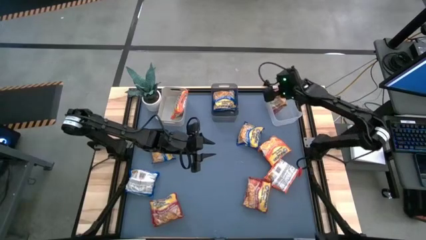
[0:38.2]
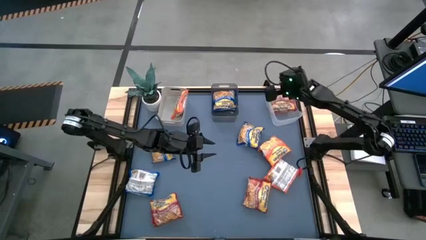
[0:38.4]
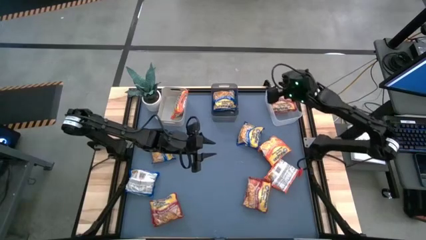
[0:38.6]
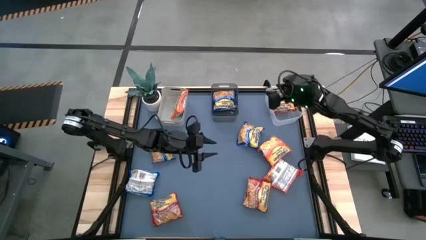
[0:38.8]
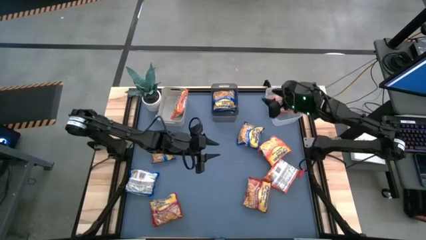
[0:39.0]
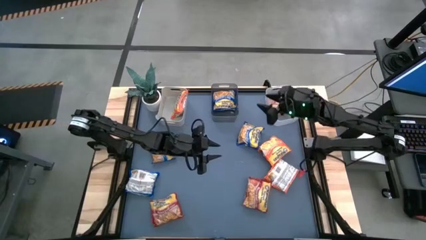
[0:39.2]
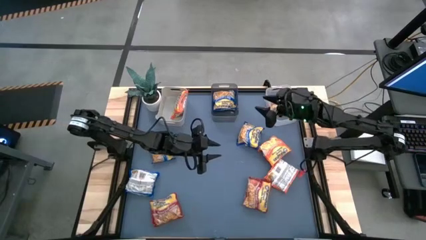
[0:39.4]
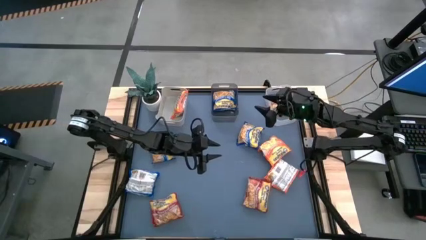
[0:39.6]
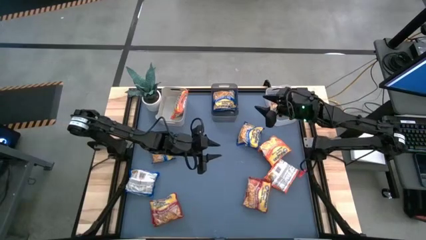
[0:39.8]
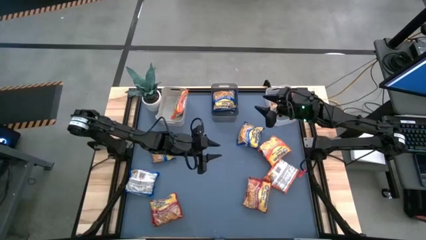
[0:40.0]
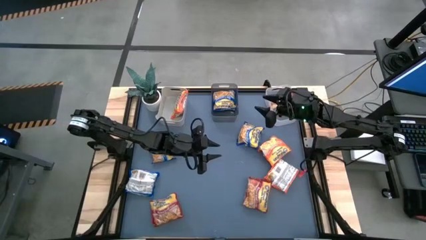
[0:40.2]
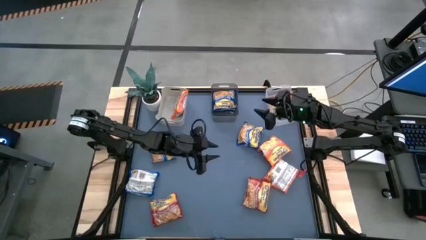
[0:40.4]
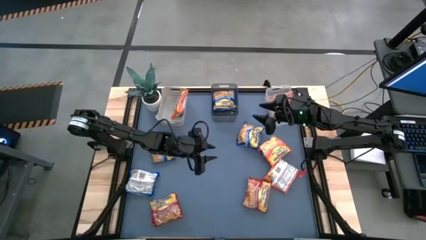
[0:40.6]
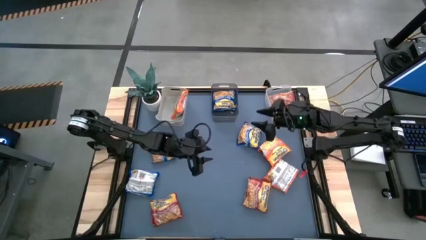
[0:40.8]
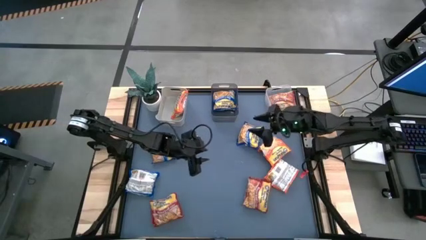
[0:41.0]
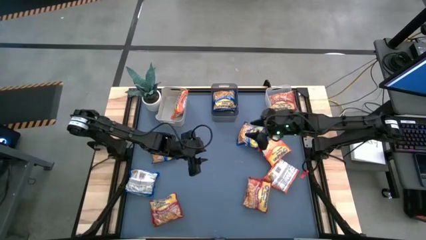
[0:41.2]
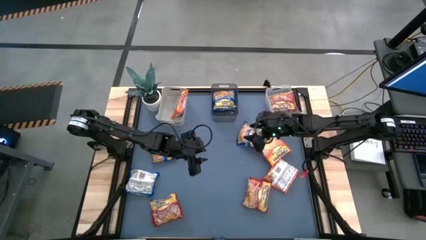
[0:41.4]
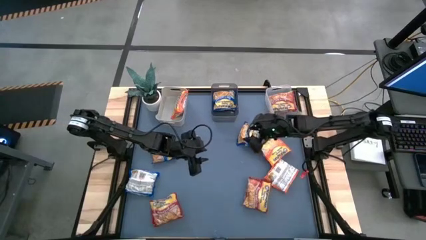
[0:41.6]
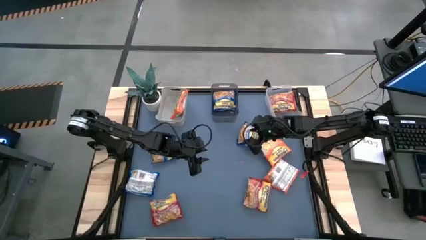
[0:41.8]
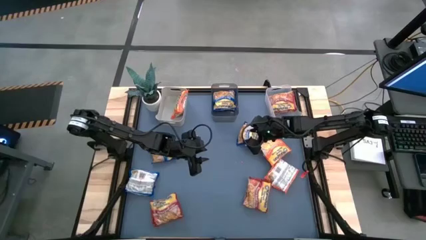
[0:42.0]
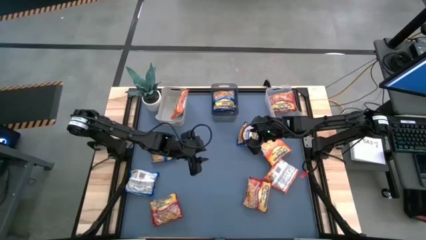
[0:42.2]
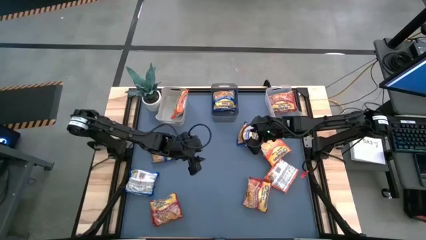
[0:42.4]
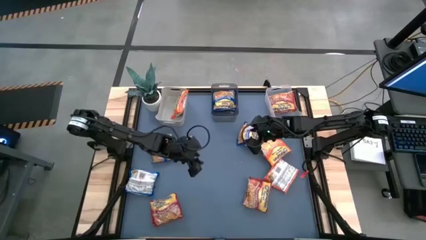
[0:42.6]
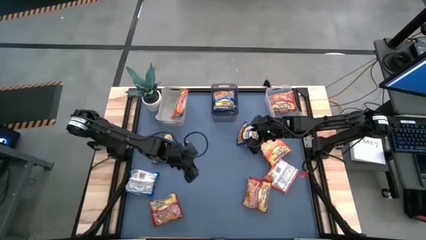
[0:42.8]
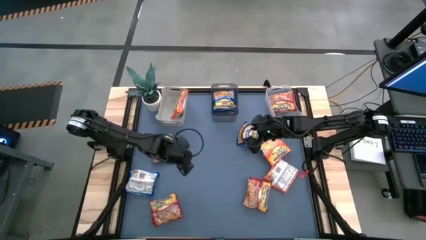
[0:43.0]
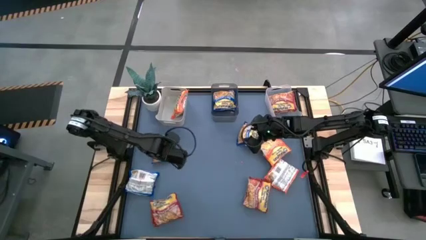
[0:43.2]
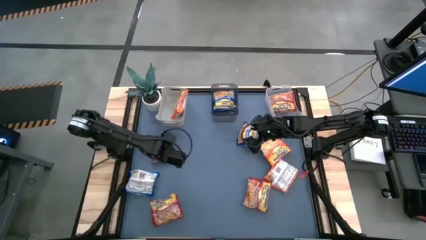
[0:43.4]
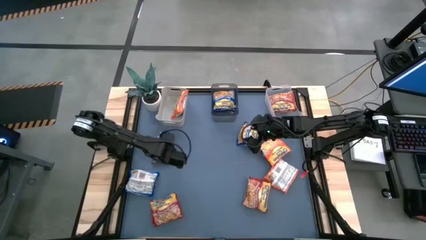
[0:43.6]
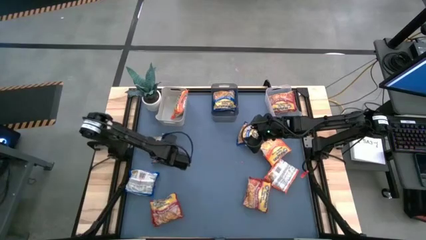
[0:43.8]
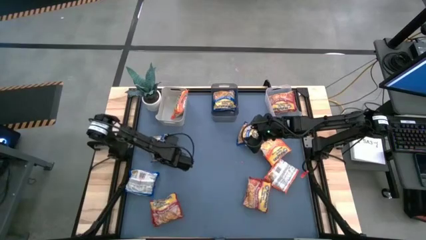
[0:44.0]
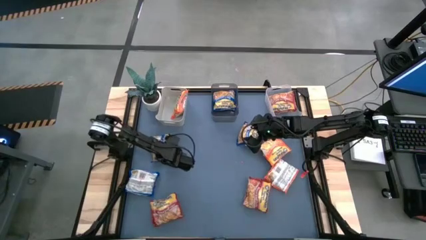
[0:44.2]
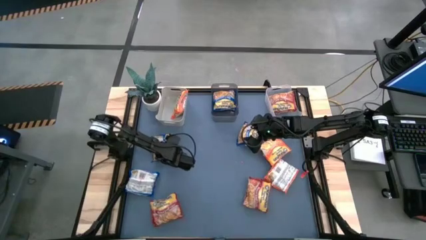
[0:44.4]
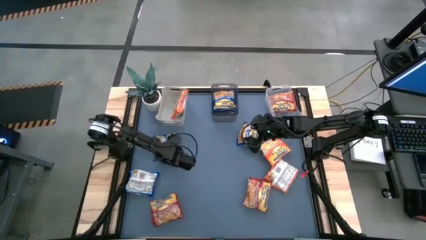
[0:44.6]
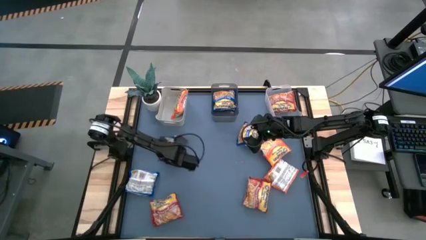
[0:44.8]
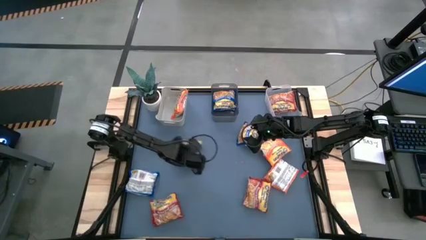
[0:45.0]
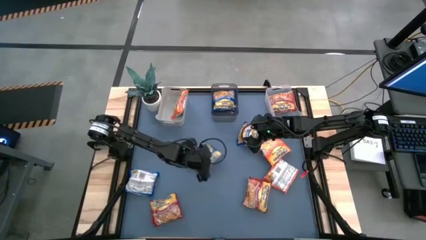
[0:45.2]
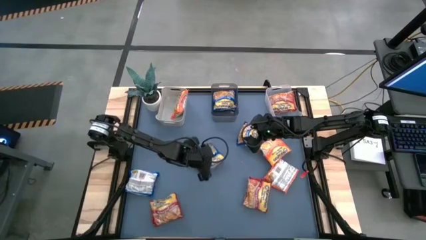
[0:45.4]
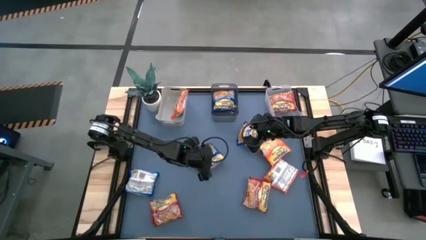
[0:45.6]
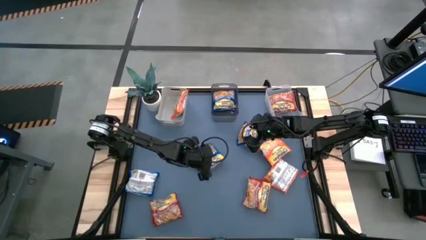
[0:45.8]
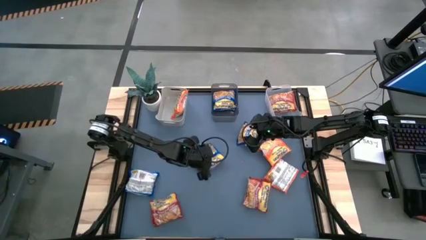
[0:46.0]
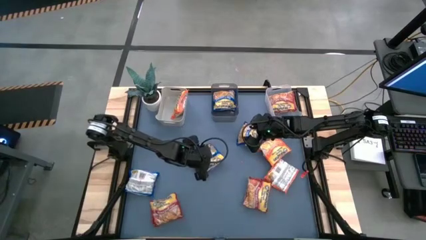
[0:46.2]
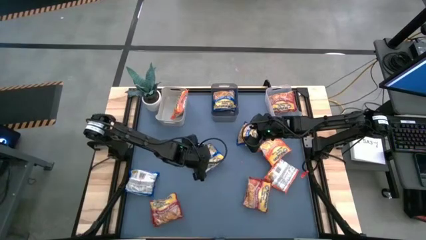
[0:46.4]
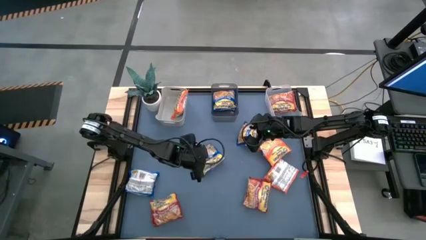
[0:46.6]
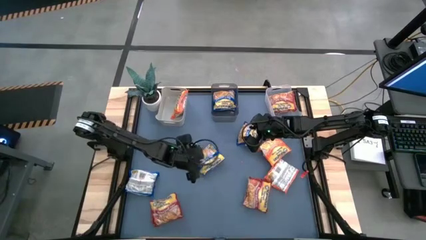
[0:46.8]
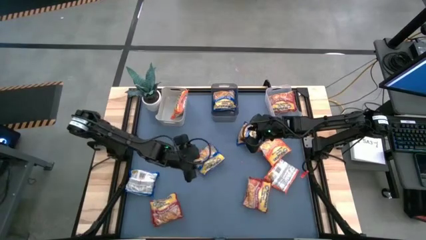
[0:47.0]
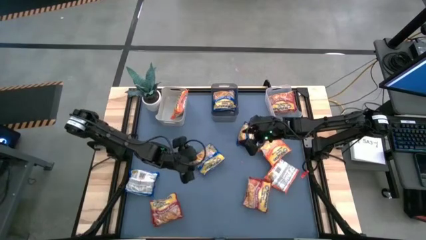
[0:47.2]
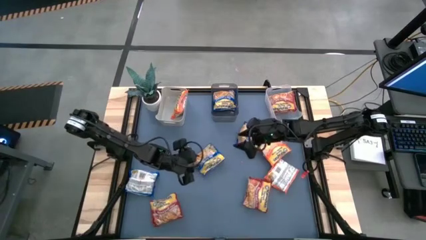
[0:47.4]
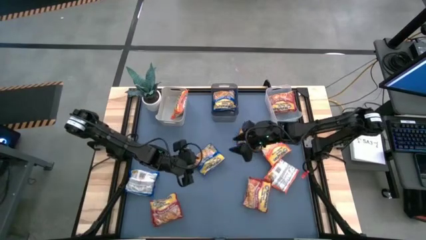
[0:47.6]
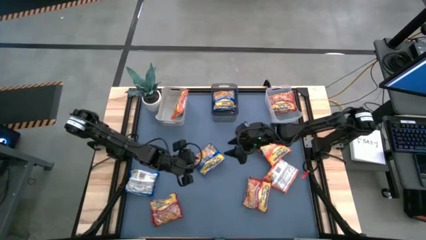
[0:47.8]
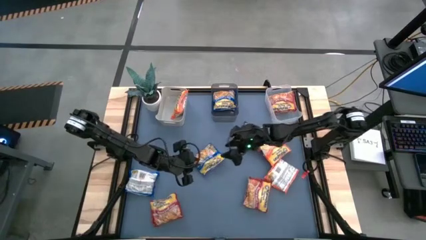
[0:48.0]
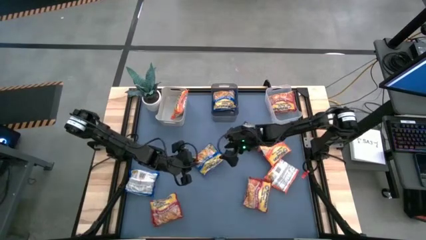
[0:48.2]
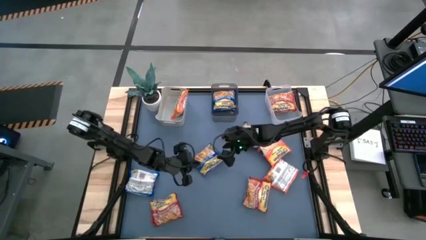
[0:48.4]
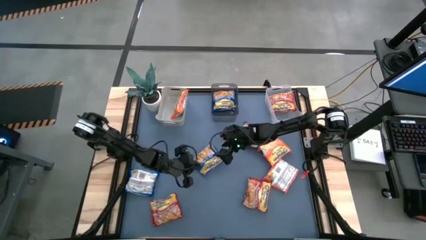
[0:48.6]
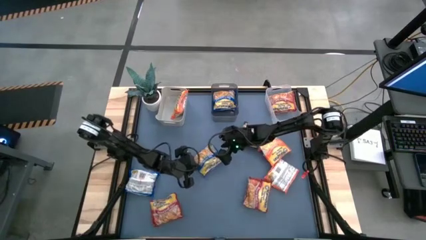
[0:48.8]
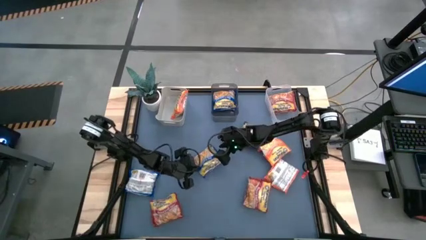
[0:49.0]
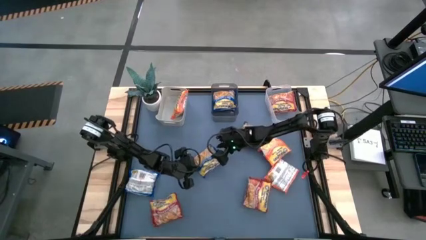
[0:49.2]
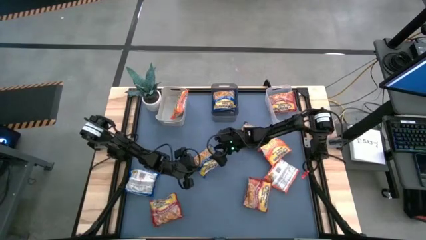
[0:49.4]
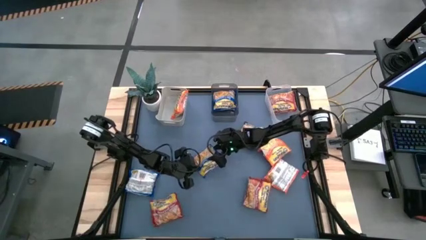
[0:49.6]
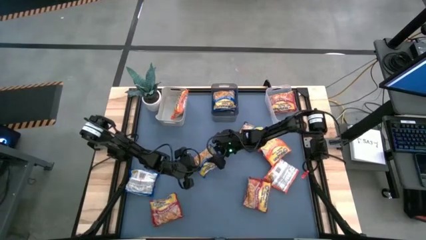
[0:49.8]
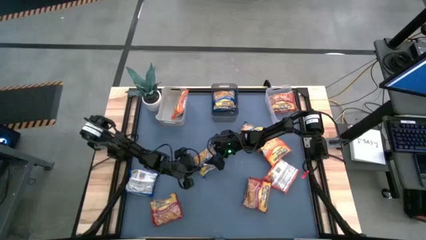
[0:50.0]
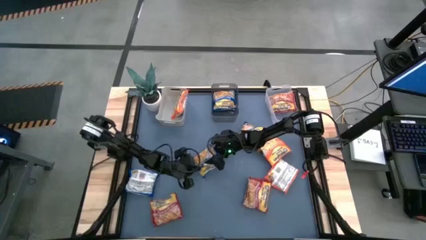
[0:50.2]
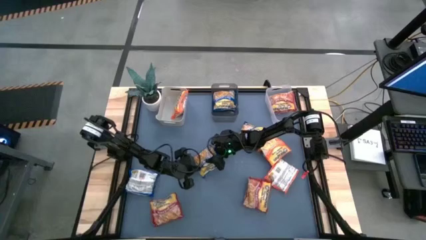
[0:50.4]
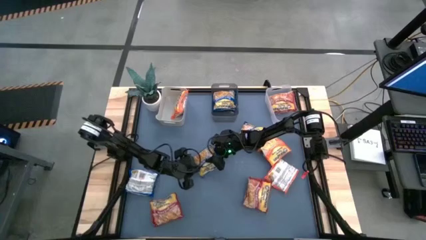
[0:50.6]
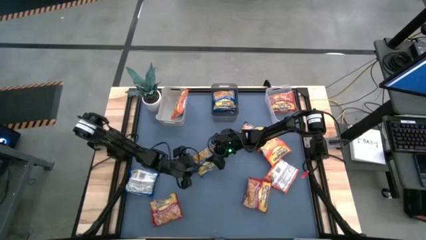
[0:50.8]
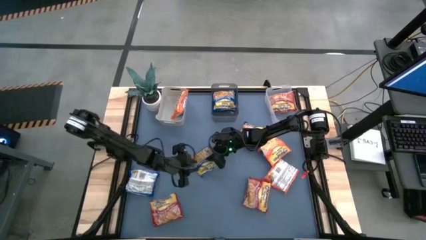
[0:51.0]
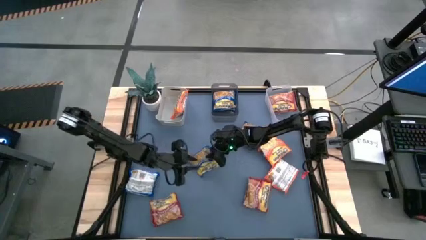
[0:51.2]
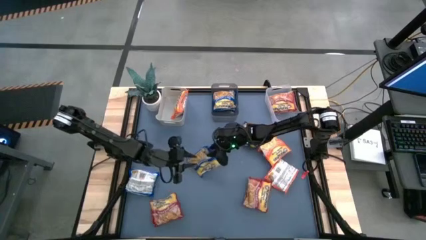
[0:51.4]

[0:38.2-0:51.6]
Task: Sort Maruchan noodles
Put the blue noodle pack into the black bin

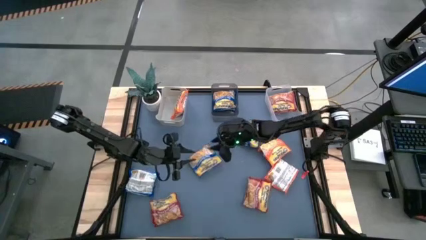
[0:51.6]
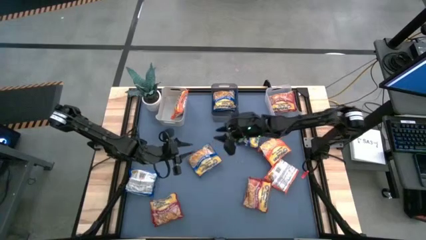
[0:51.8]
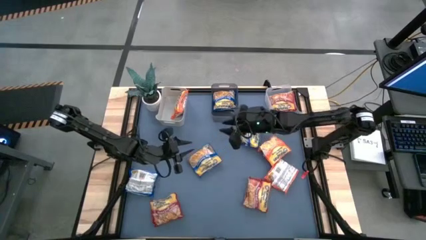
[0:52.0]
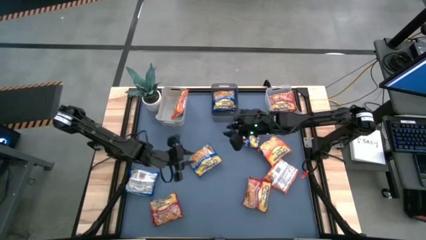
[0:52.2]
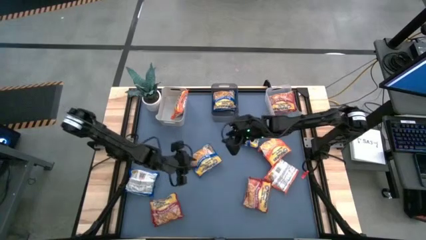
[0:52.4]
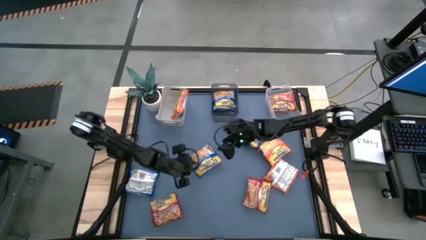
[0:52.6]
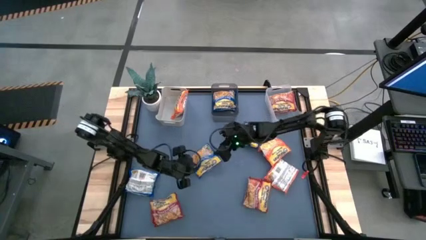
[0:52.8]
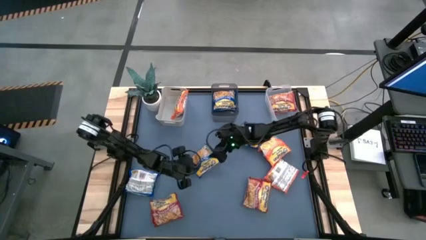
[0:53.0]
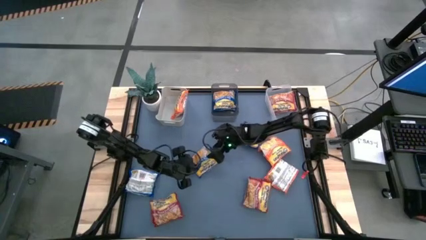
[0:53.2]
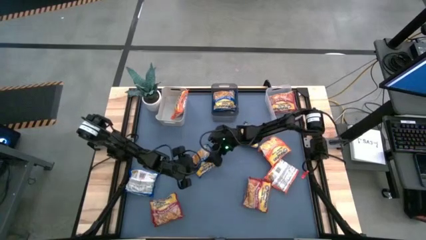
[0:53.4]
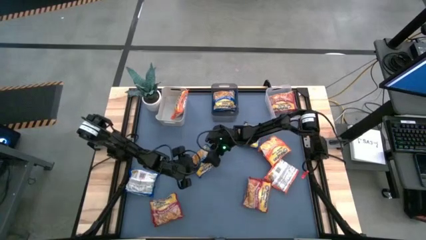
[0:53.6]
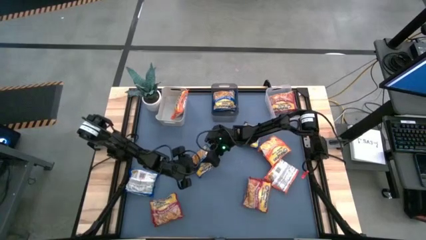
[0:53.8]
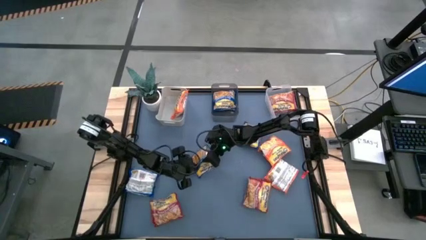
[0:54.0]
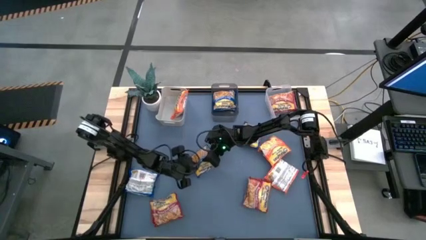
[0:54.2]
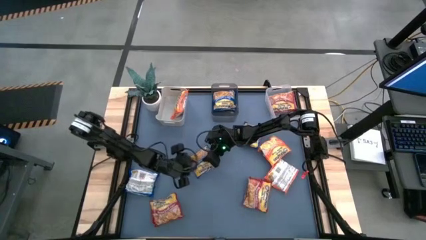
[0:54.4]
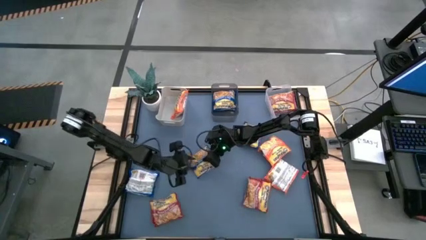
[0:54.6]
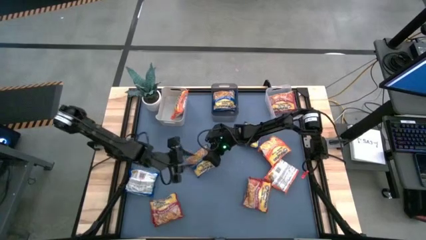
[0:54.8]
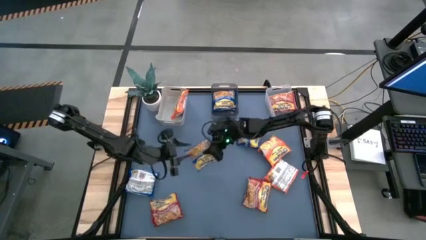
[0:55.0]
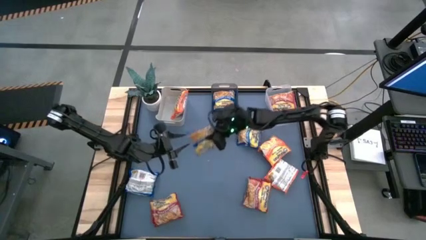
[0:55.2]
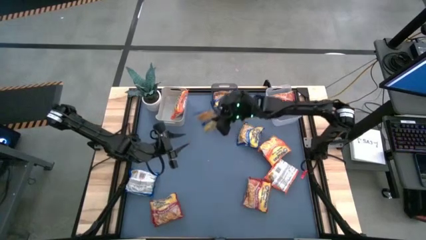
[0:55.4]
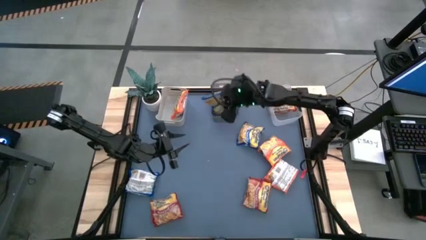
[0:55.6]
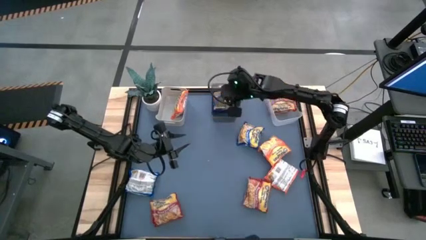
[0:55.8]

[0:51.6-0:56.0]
Put the blue noodle pack into the black bin
